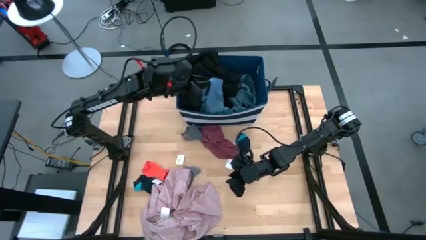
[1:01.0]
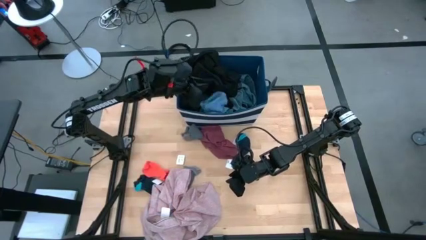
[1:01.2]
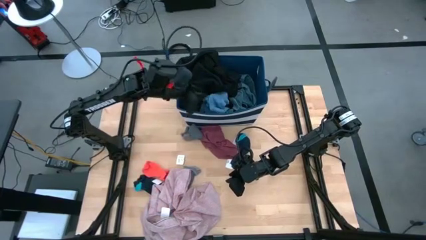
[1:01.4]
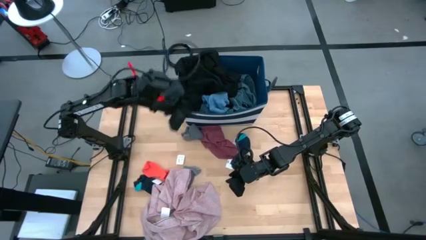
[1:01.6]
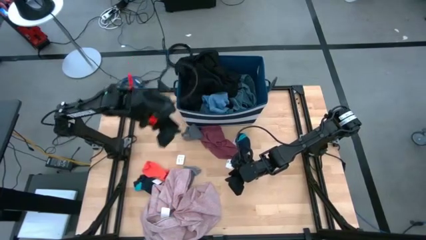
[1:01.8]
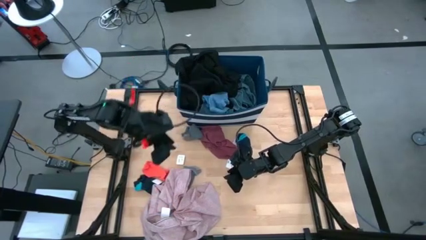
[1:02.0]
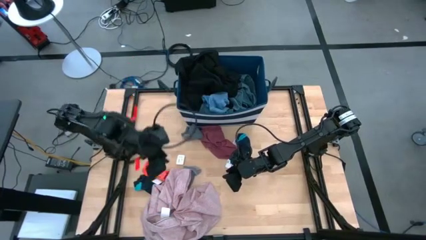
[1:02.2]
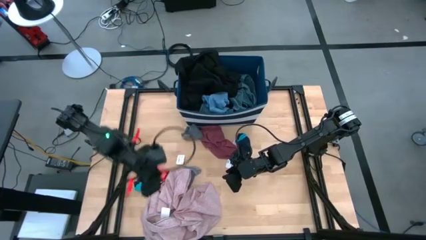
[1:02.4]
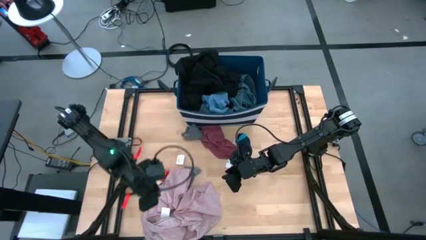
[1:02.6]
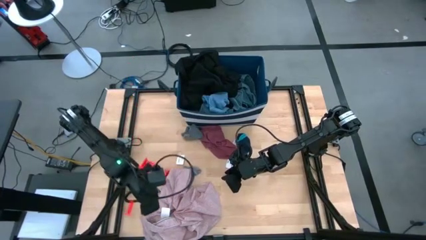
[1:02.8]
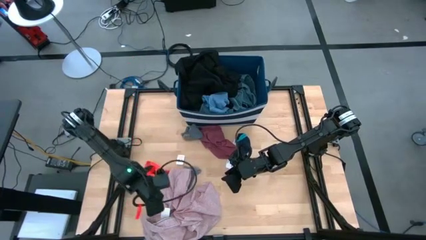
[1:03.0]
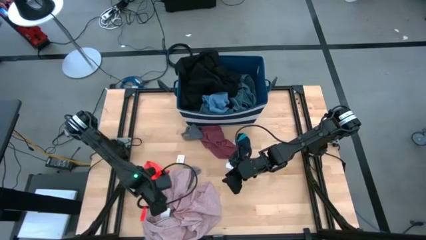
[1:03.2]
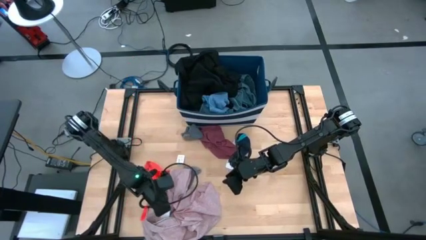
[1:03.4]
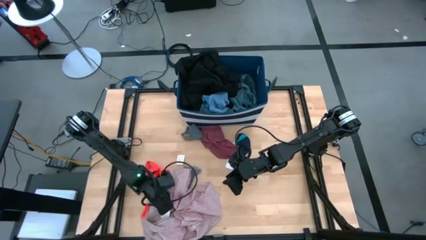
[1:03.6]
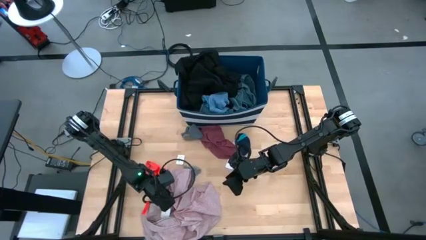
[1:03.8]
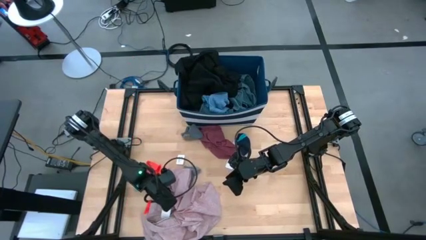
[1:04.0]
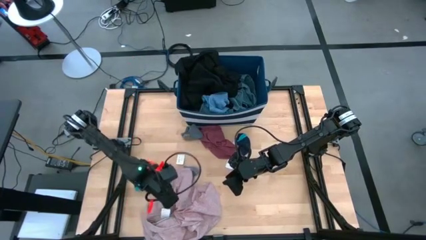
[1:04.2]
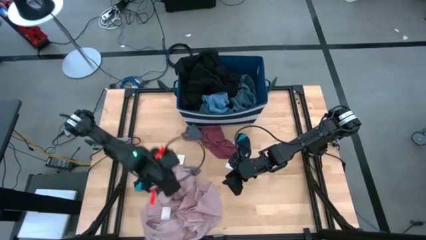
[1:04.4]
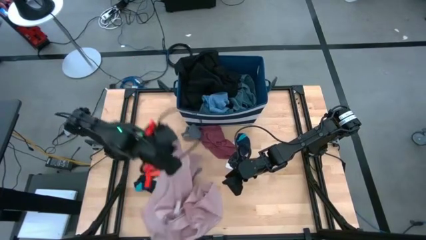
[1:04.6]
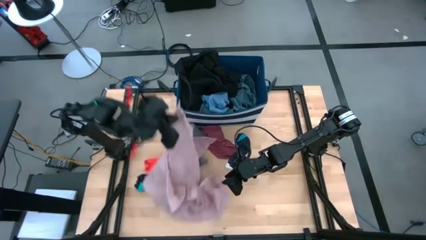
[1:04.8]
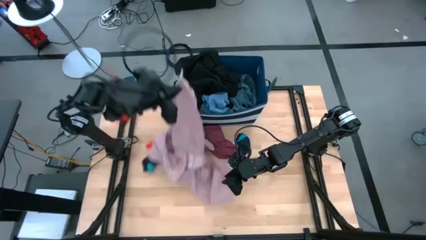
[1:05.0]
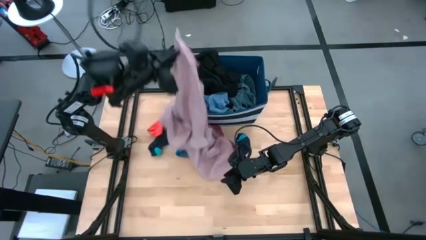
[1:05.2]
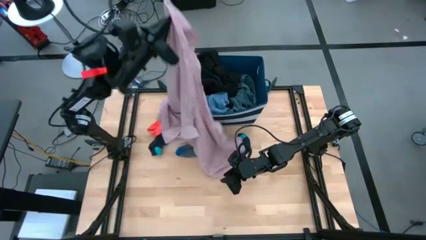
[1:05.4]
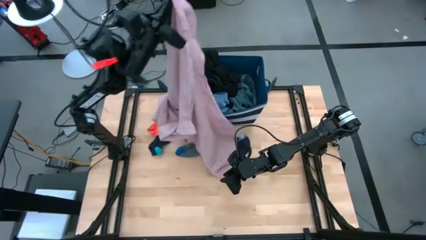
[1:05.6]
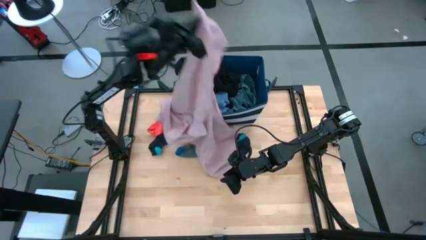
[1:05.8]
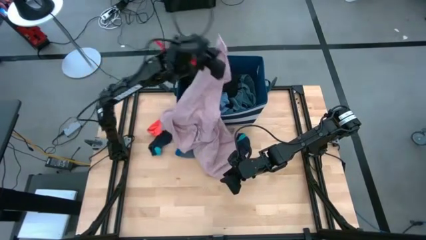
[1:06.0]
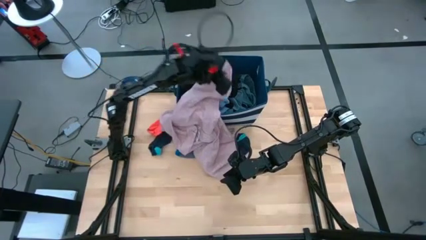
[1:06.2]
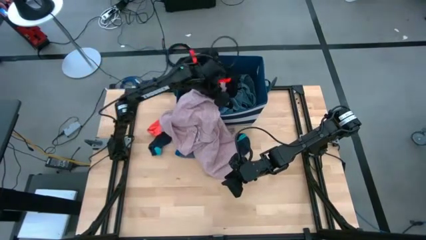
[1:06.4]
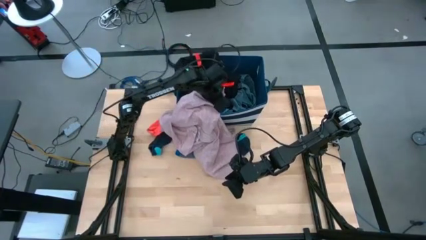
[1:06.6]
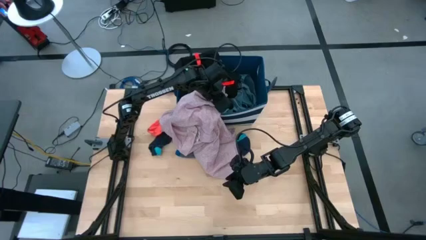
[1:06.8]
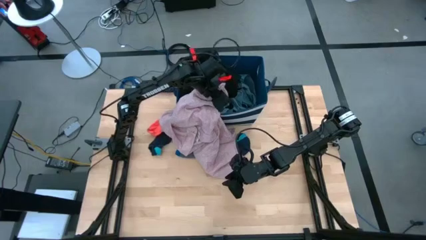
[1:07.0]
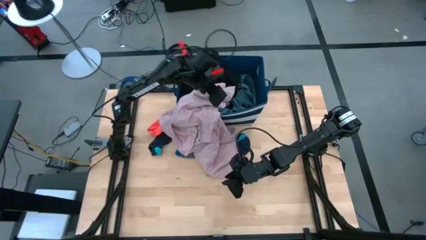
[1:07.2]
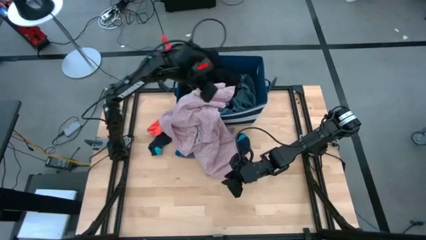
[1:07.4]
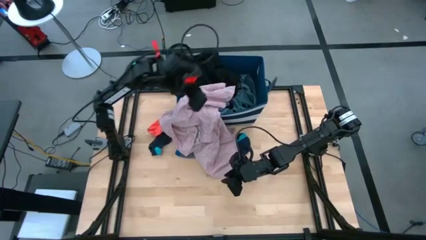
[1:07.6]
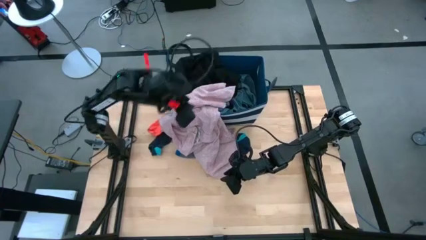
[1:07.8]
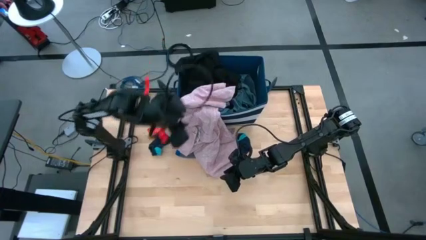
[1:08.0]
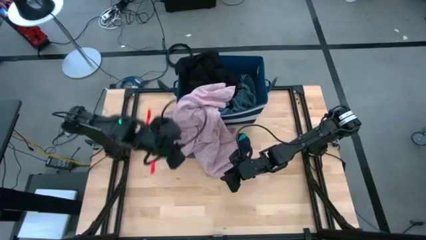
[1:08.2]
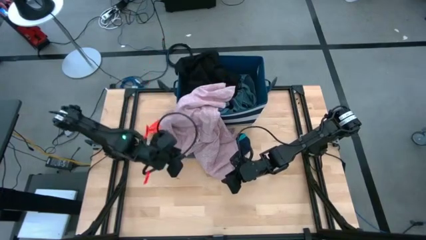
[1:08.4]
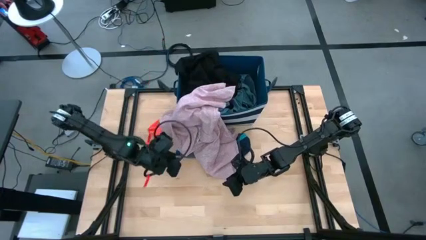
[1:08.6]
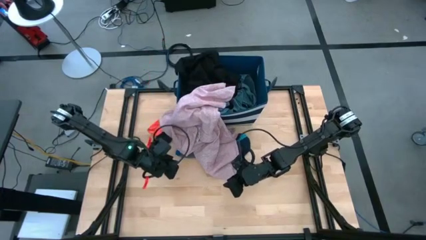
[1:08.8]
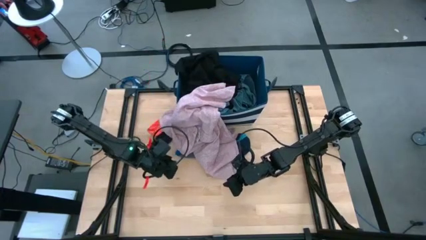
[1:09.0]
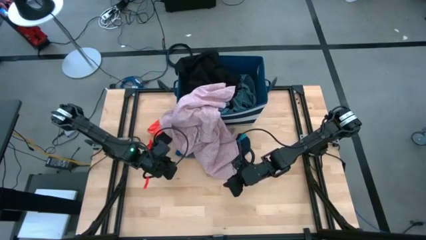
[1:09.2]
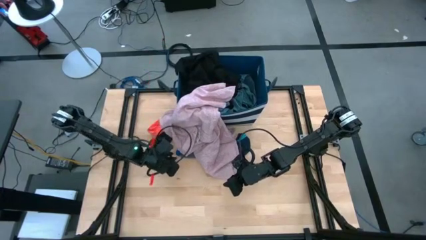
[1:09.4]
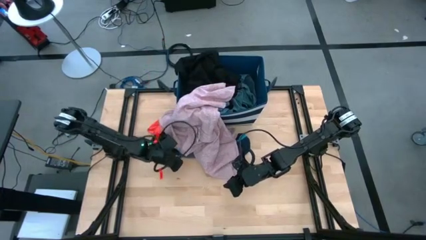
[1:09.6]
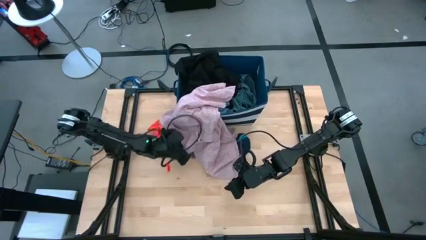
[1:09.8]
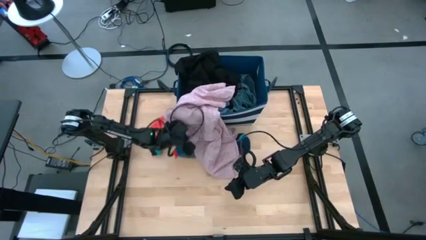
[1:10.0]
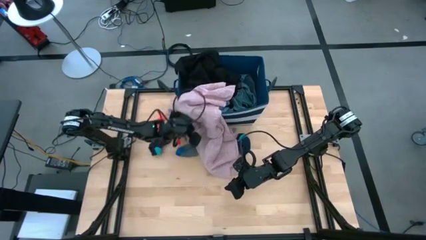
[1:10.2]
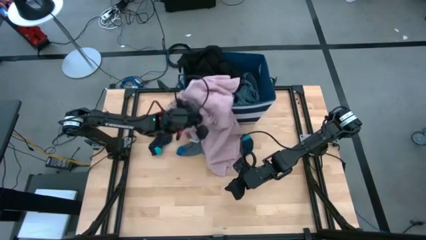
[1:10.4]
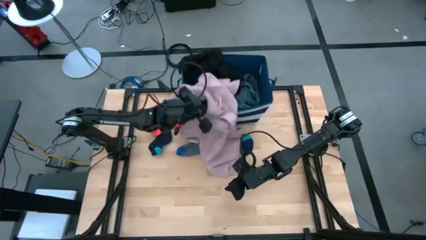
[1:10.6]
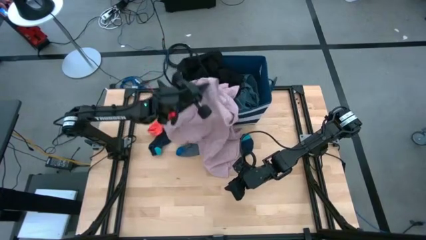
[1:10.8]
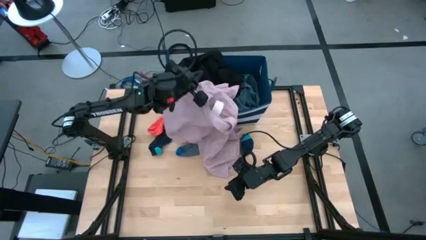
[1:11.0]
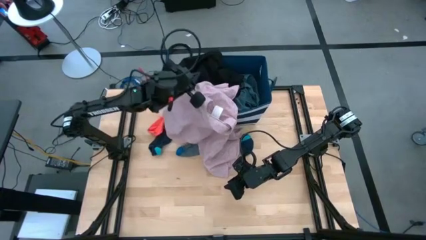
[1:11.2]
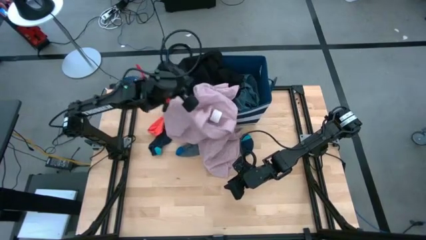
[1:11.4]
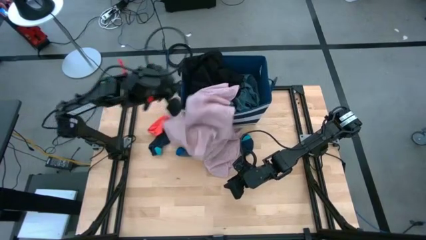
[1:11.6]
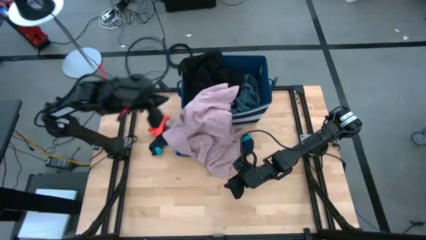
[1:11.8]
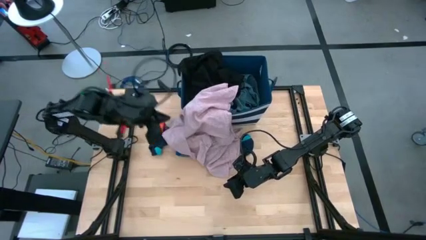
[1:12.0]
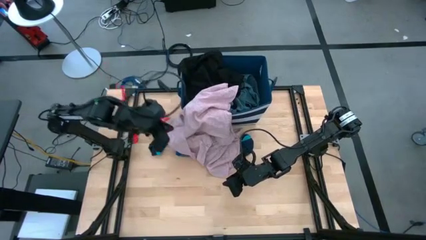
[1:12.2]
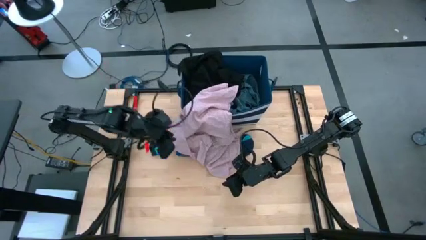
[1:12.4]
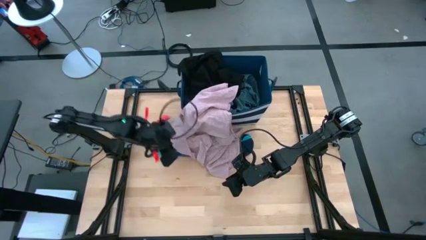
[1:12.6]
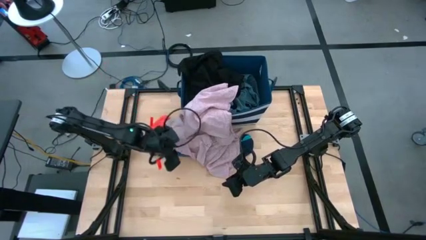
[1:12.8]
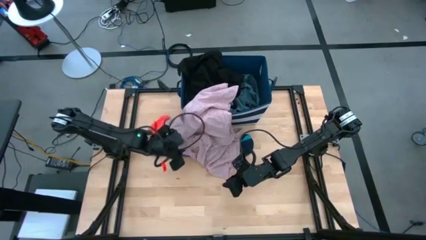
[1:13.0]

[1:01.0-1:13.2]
Task: Sort clothes
Put the pink shirt into the blue bin
